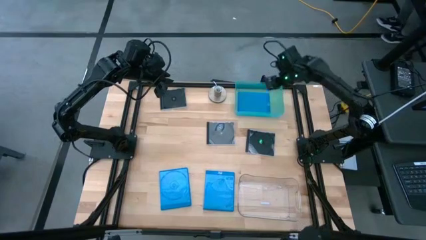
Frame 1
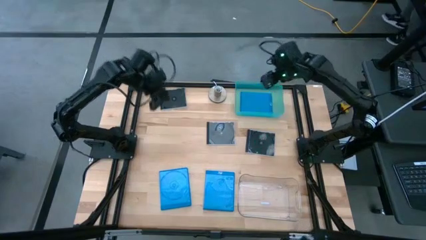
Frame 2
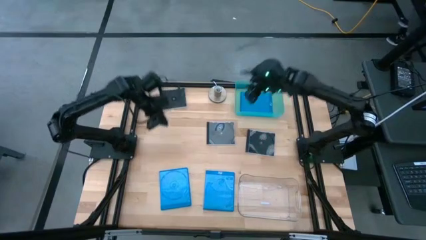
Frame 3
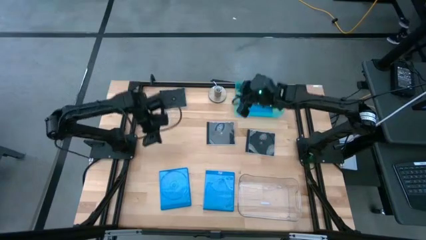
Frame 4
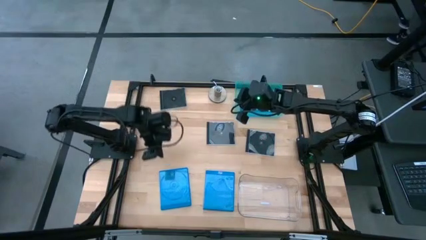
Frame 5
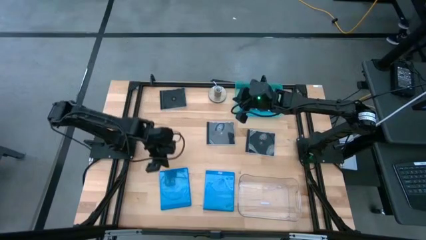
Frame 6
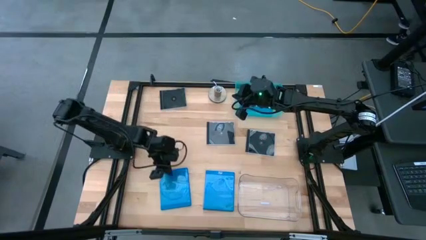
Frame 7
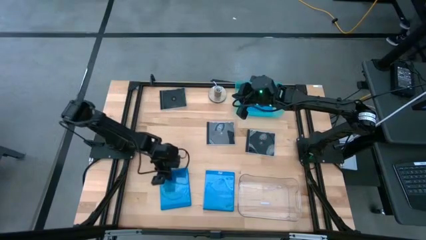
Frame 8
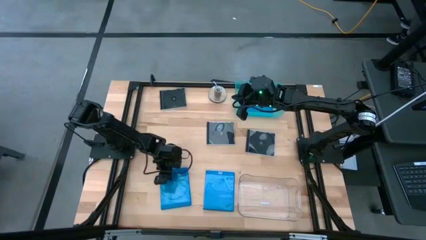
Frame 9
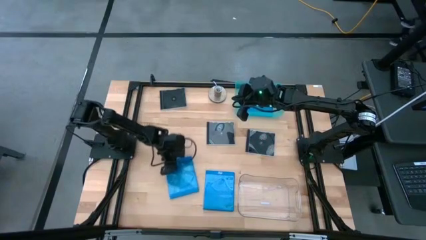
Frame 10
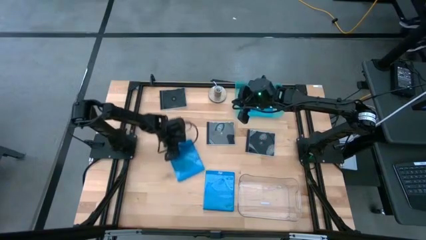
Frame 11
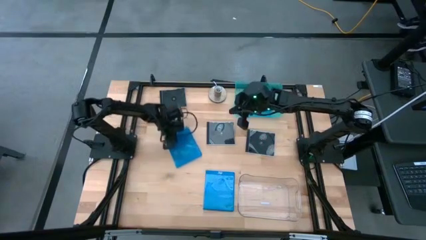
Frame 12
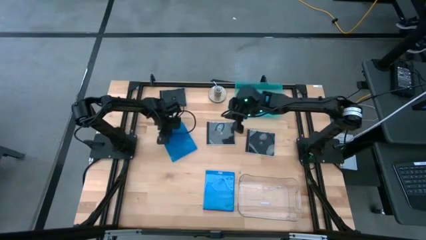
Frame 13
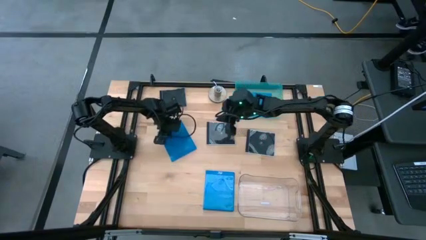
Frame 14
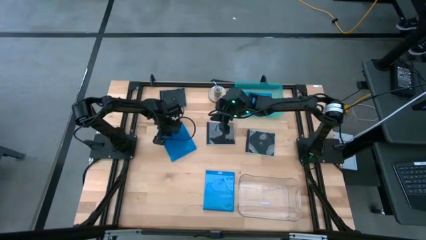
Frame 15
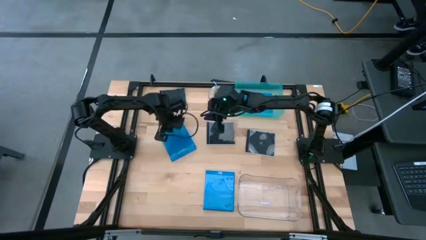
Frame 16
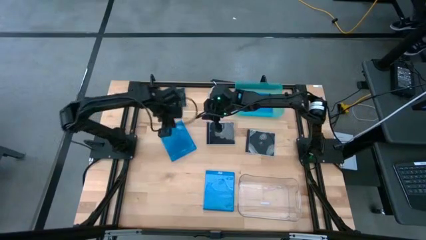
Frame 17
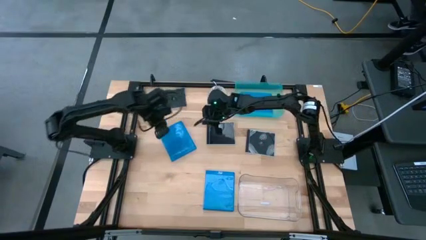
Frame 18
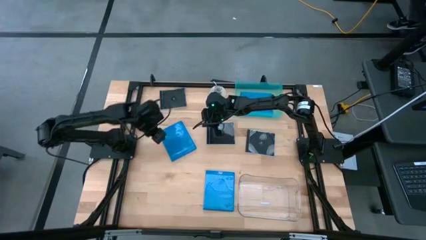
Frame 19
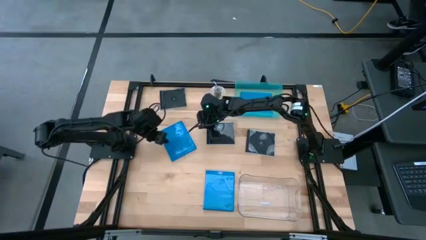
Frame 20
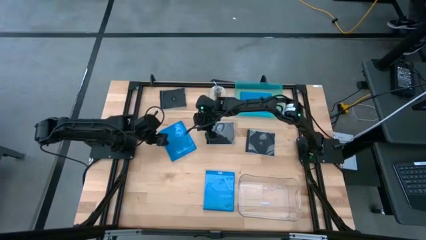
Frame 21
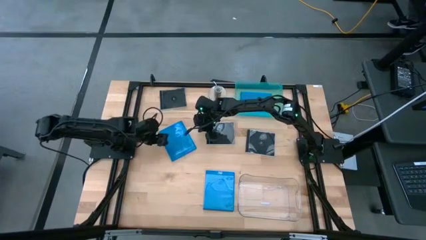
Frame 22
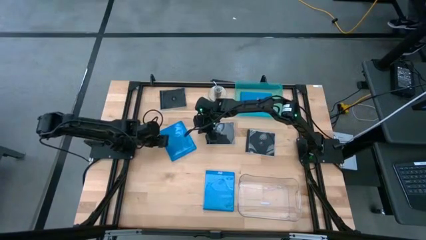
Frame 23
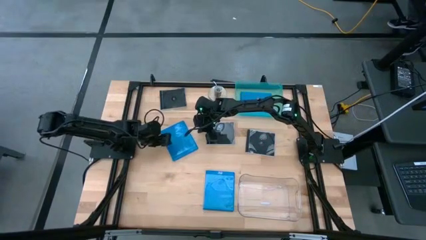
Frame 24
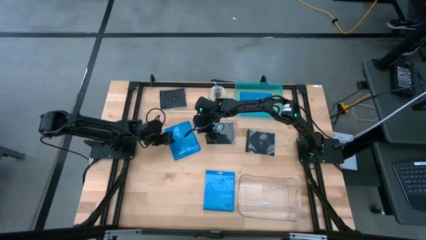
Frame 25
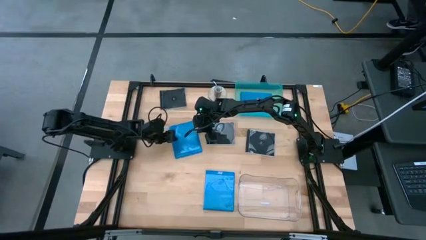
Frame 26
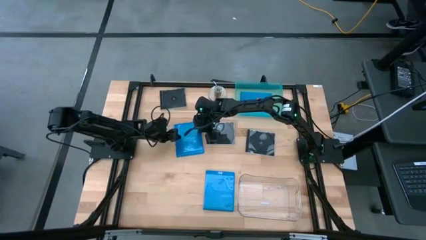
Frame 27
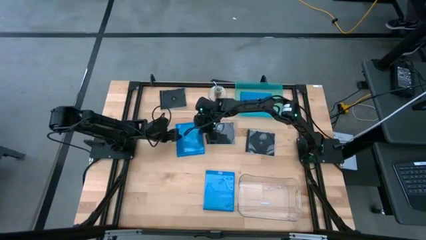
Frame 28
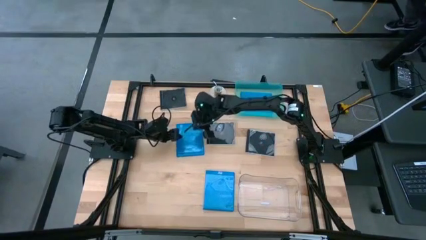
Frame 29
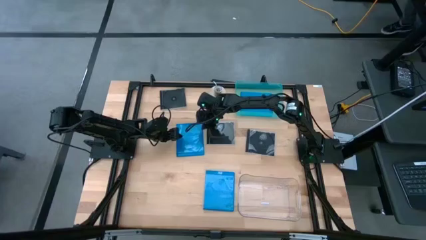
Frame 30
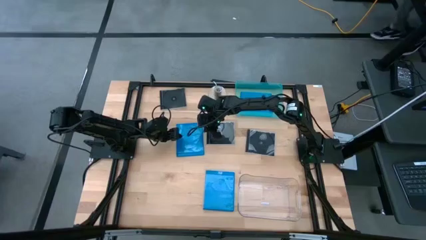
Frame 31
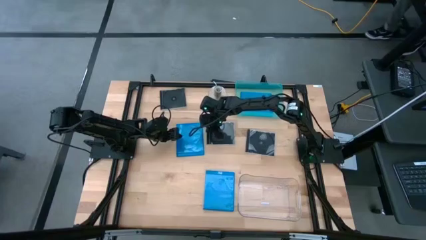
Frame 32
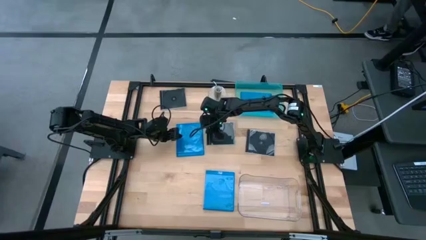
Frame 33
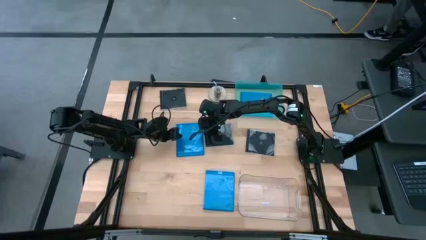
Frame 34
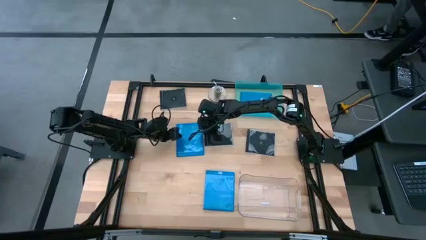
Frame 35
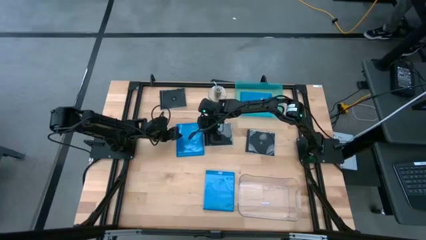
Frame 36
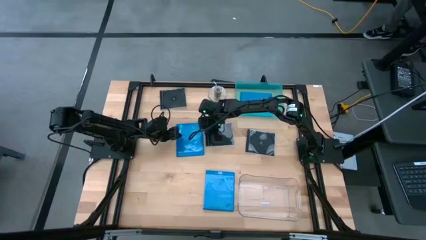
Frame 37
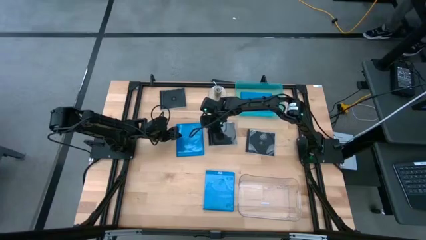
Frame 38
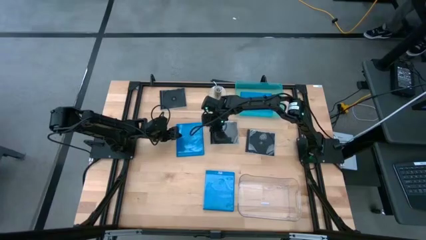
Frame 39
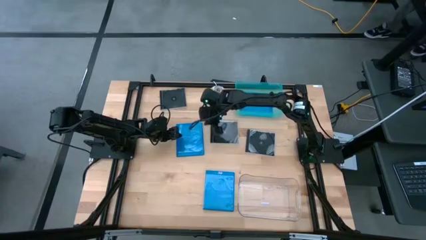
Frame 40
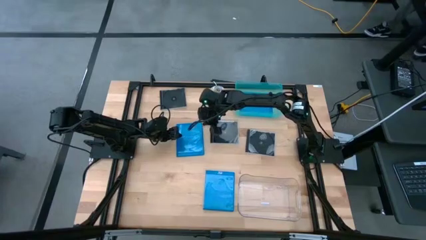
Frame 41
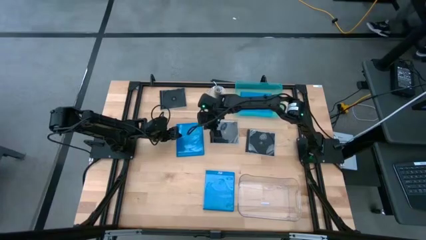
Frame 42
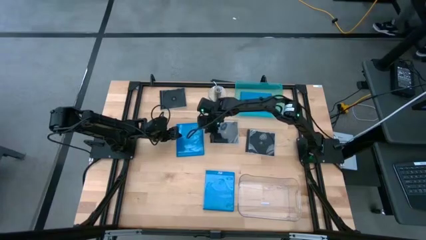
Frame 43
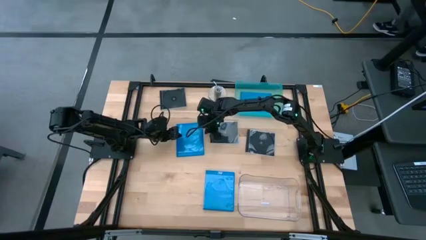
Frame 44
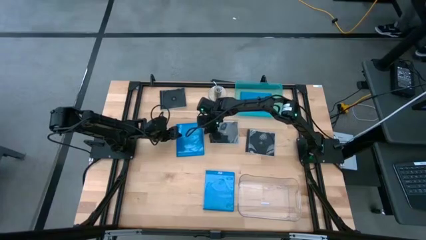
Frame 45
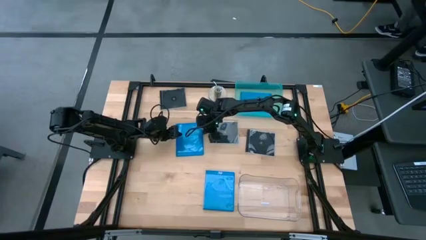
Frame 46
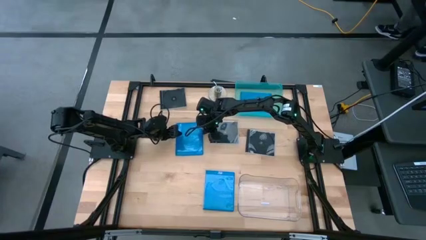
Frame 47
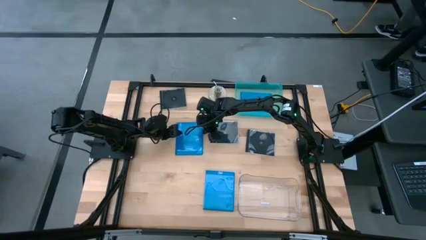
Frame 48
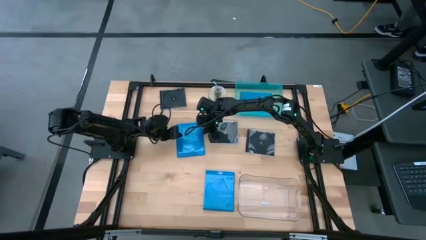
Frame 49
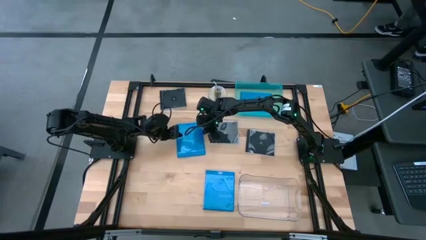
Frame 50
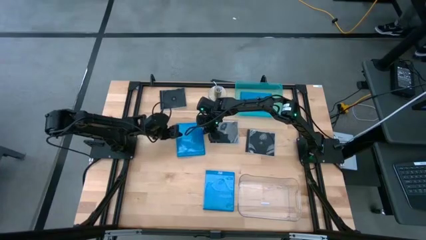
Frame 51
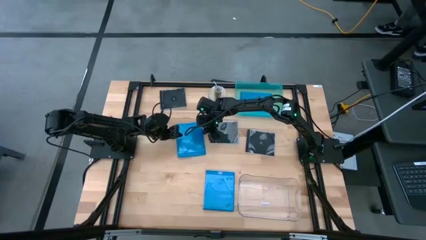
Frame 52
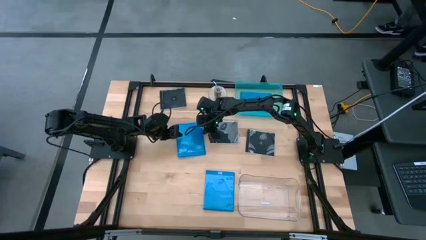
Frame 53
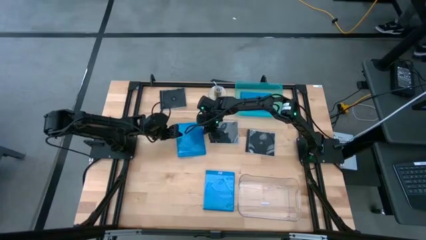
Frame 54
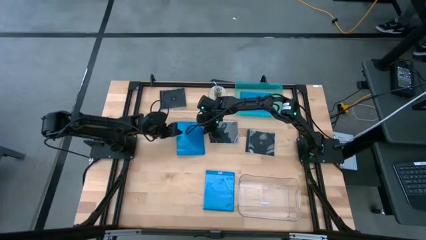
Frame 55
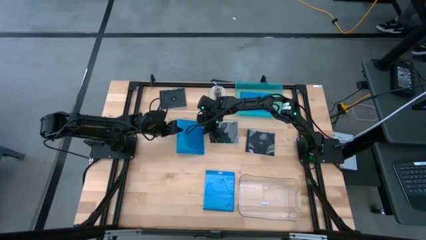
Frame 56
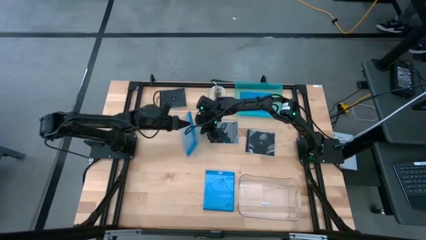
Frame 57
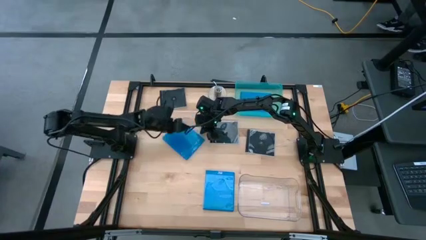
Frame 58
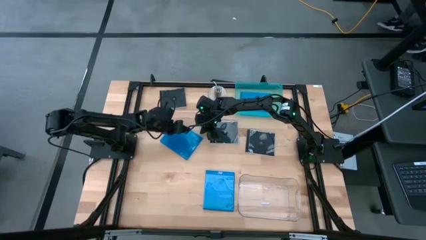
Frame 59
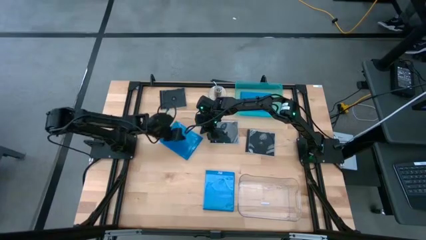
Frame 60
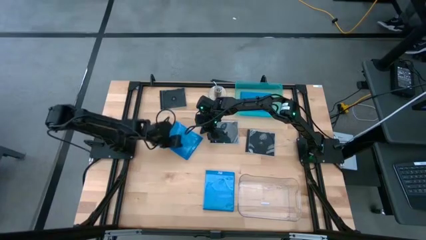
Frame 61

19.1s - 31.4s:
Task: Pick & place jewel cases by type
Put the left blue CD case into the blue bin
